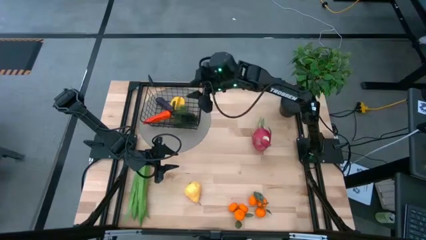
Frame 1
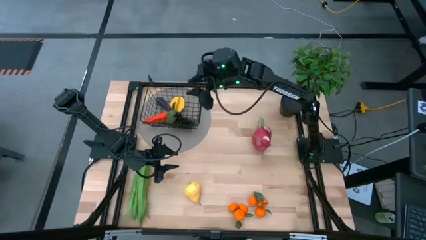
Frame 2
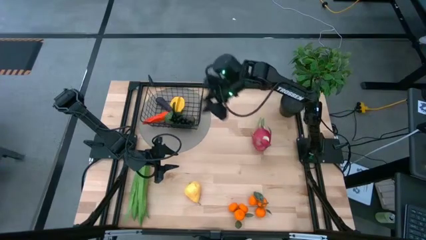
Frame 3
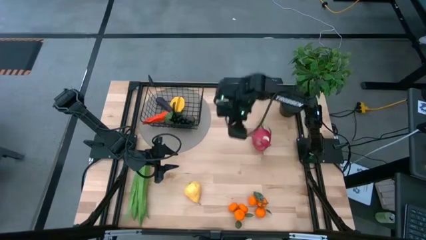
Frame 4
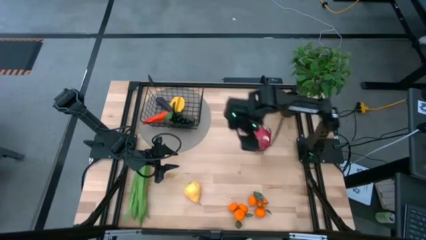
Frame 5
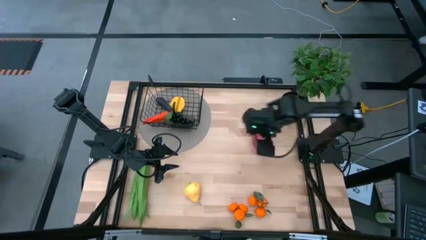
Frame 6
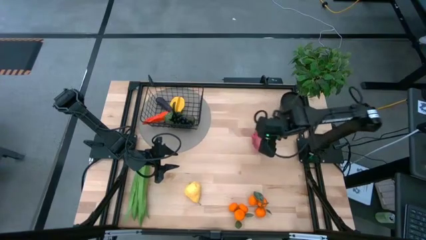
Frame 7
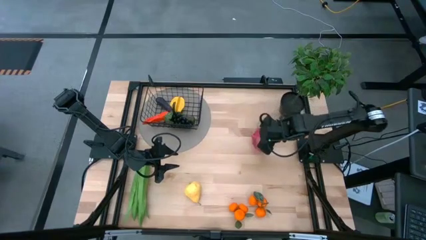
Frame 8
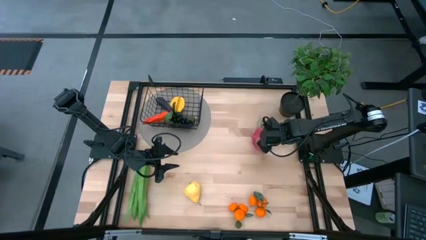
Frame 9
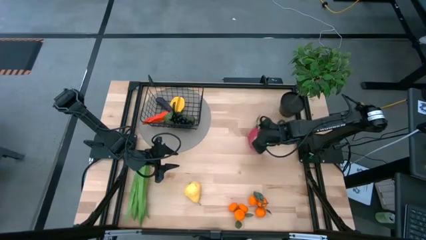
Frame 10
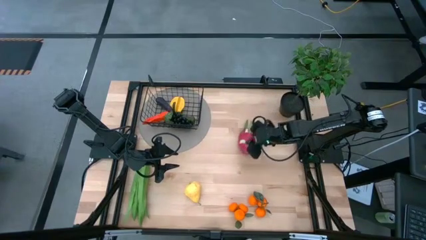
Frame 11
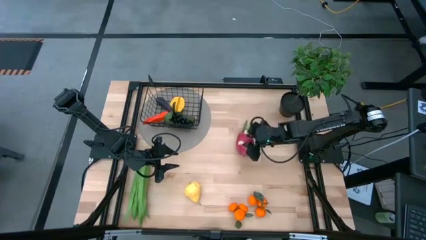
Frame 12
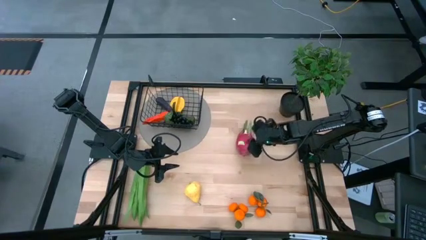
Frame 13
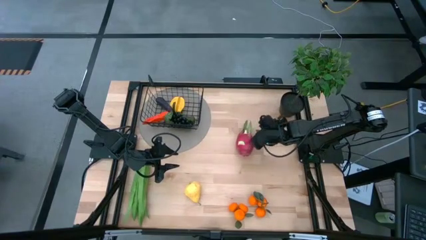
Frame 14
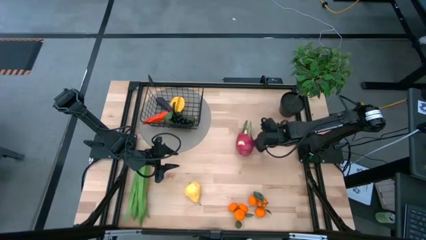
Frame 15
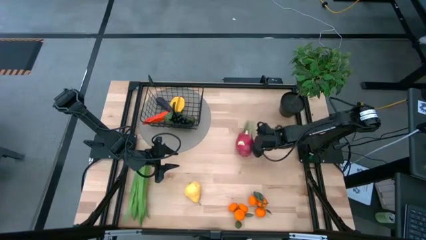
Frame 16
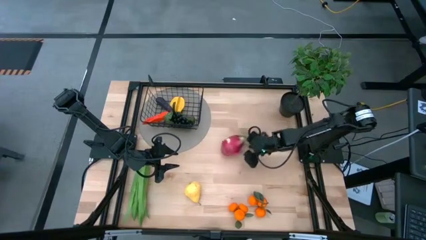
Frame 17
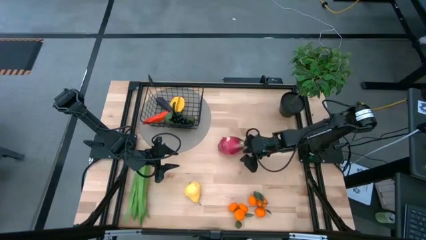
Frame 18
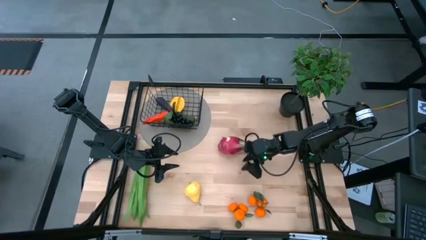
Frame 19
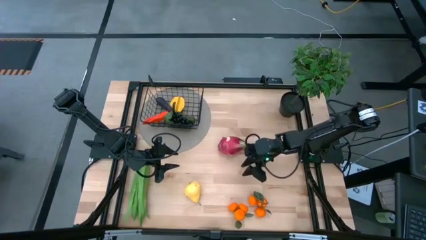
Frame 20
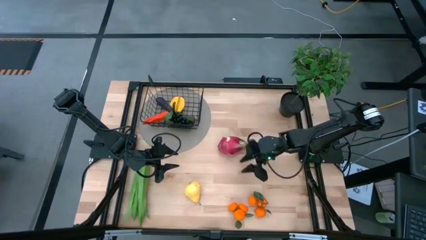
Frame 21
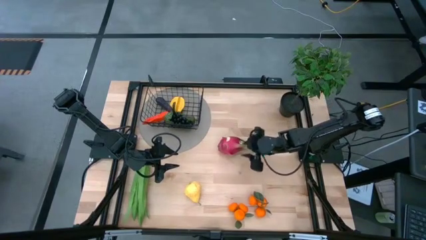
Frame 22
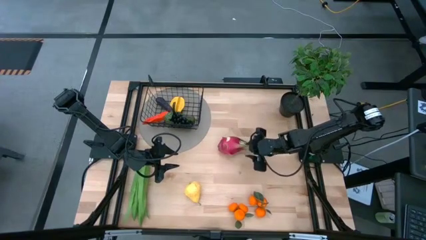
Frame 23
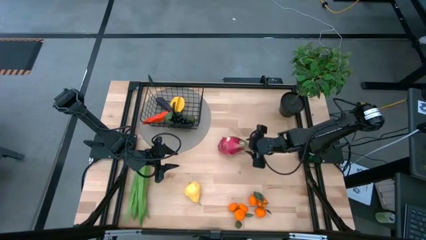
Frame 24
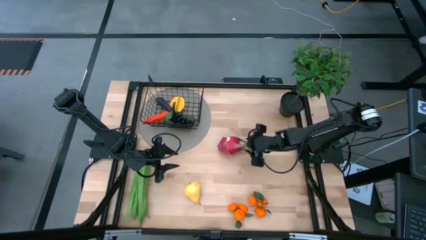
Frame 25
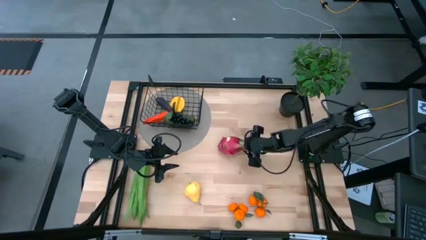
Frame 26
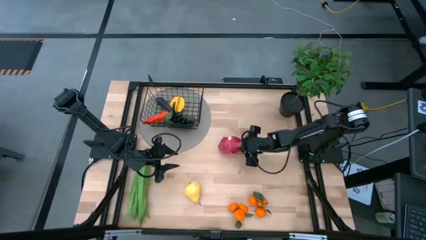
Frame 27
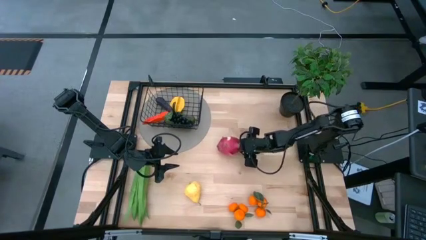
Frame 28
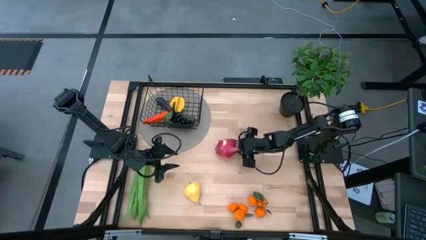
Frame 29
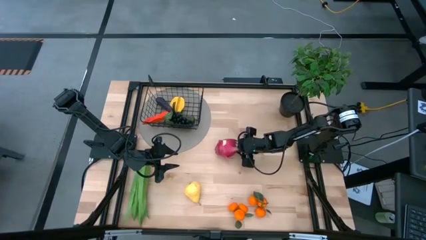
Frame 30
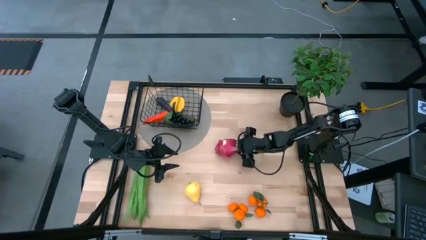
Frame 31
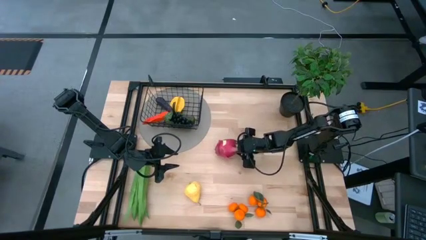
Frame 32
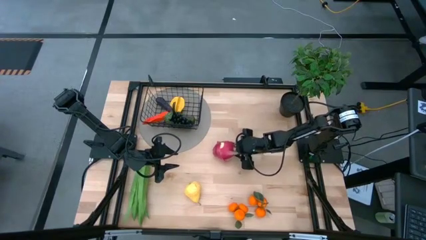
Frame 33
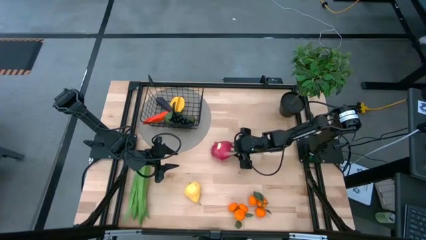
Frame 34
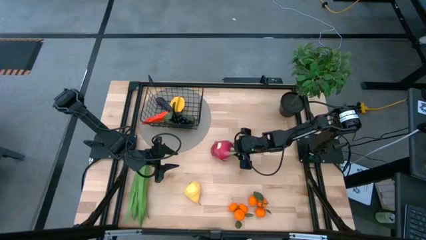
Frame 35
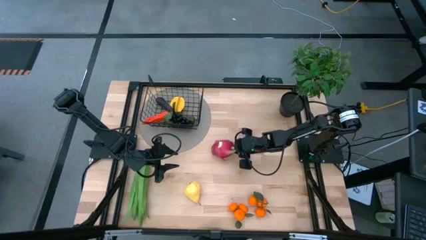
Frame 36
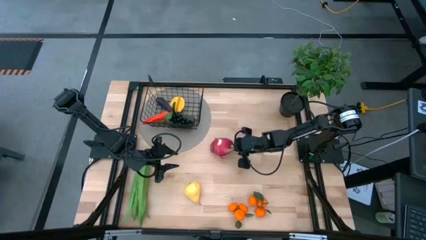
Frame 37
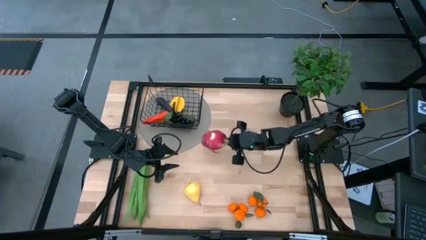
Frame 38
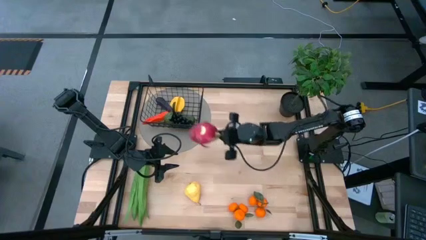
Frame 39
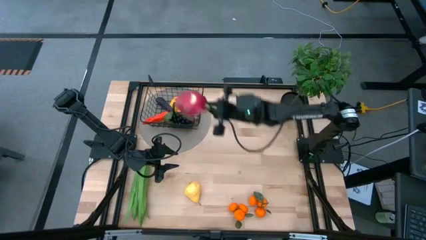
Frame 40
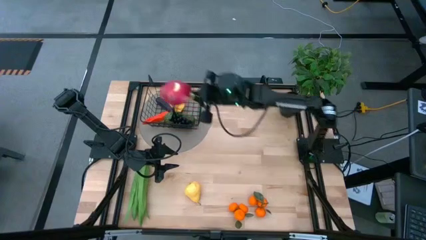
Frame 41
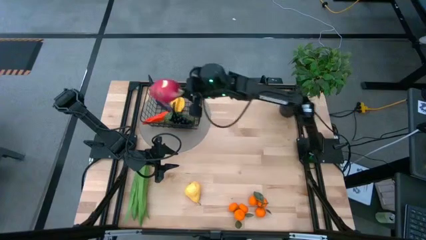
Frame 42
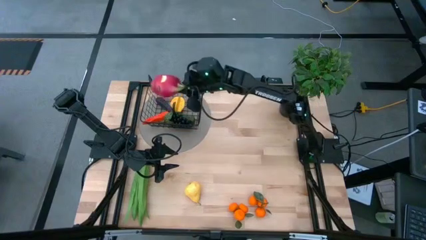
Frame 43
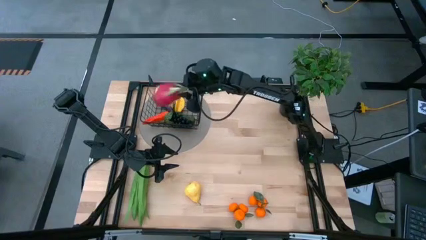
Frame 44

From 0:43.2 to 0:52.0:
Task: Build produce basket
Put the pink dragon fruit into the black wire basket

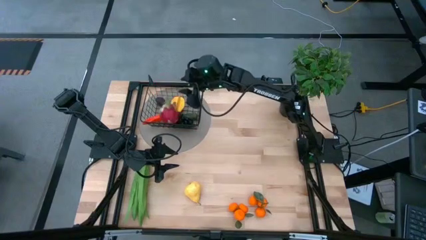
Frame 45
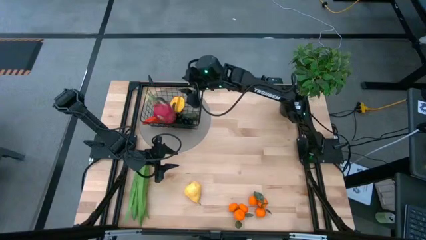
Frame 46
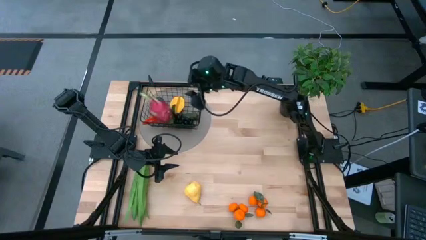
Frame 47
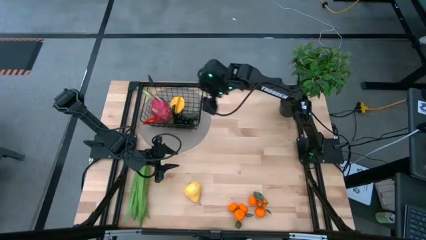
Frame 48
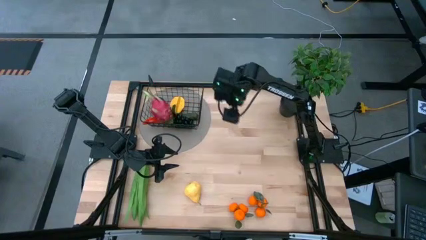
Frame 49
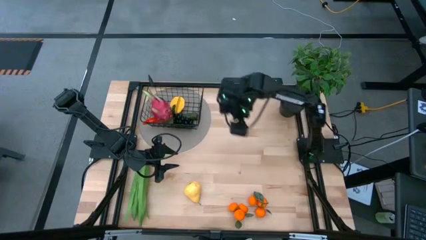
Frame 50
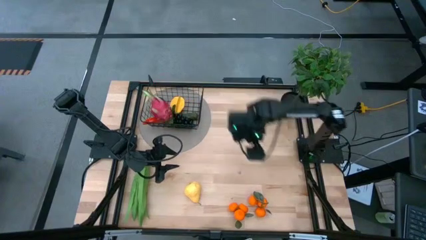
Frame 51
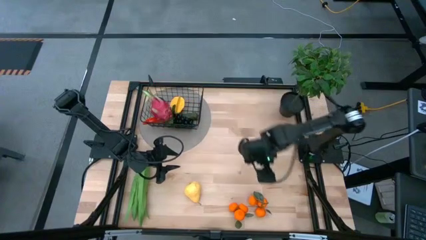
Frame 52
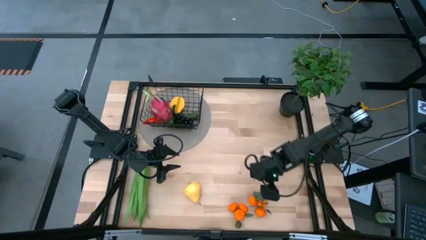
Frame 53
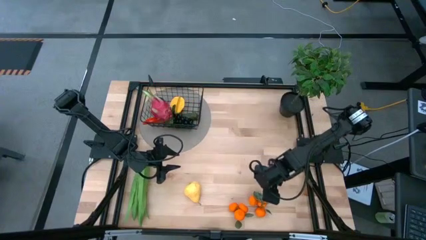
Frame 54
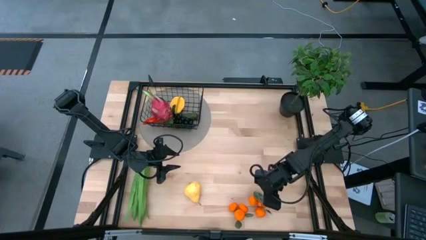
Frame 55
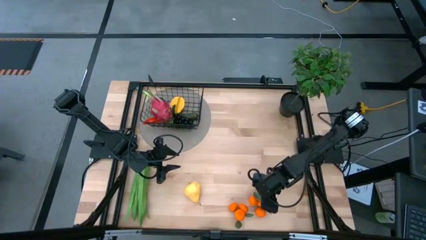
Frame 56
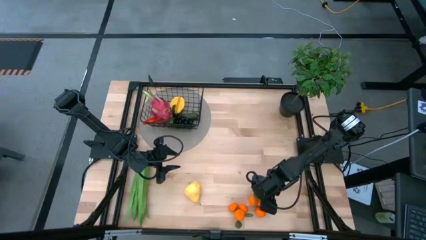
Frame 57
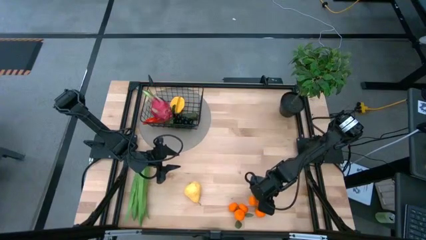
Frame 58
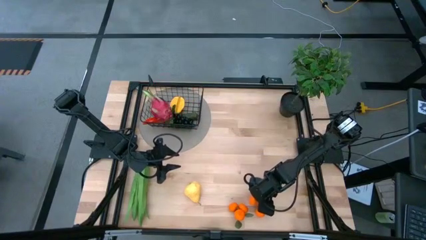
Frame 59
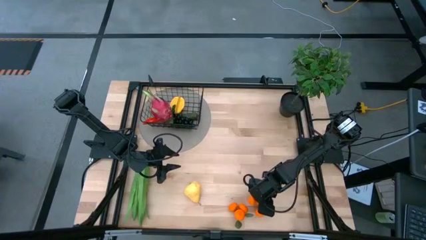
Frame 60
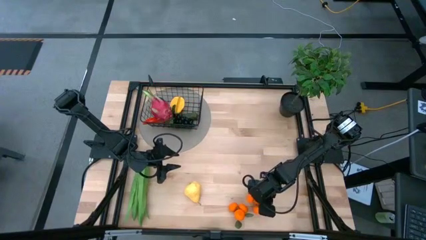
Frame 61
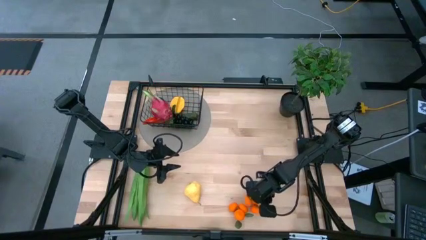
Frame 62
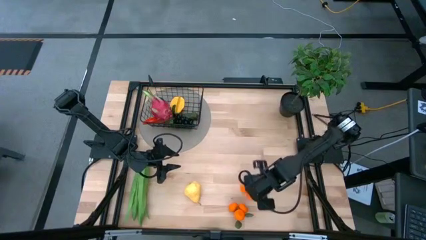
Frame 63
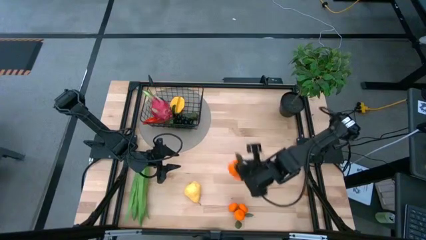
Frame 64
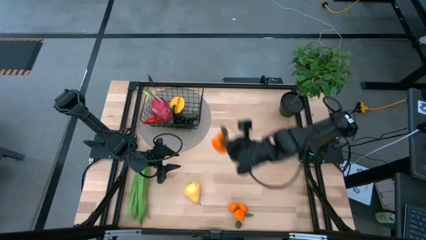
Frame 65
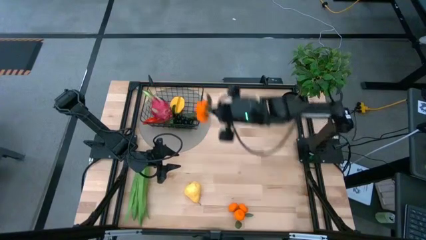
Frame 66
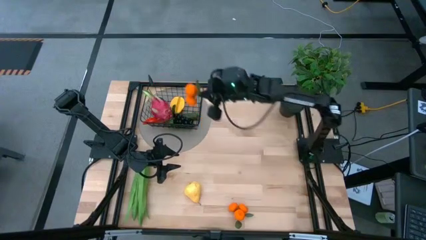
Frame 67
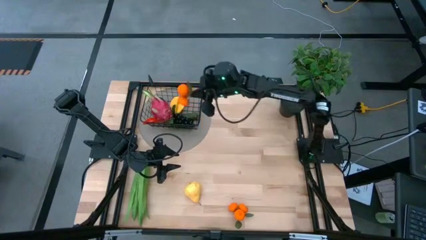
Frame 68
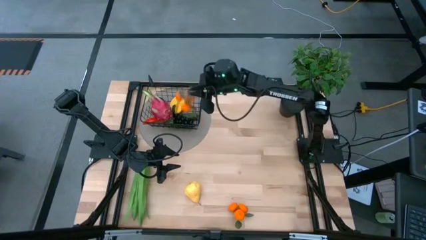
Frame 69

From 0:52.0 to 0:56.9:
Put the orange tangerine into the black wire basket

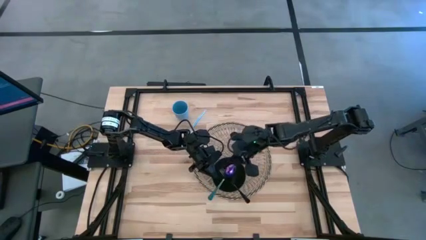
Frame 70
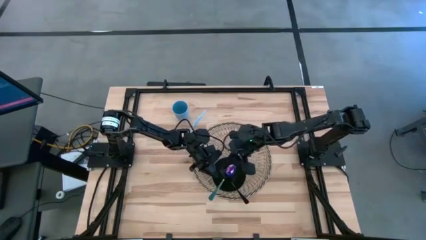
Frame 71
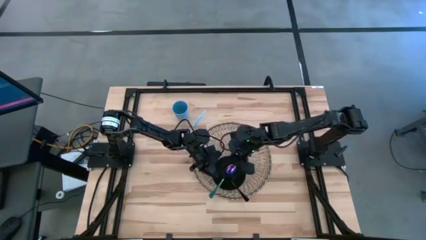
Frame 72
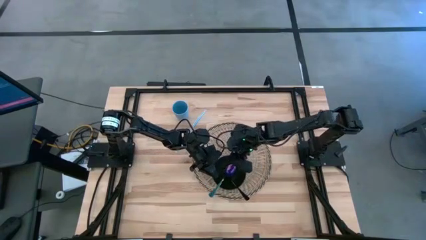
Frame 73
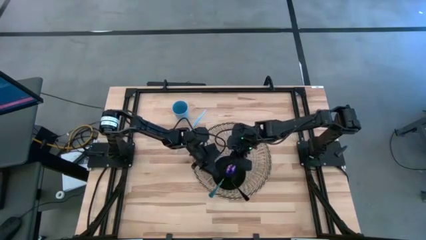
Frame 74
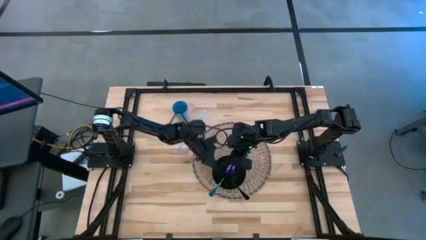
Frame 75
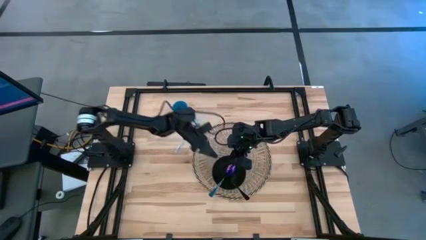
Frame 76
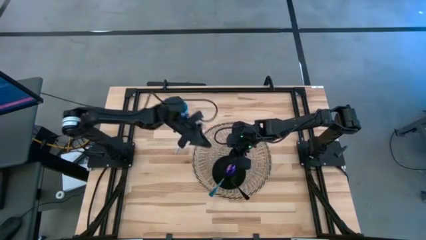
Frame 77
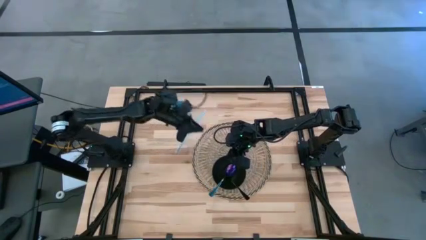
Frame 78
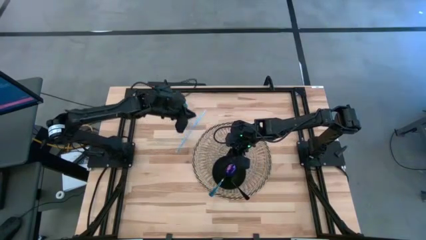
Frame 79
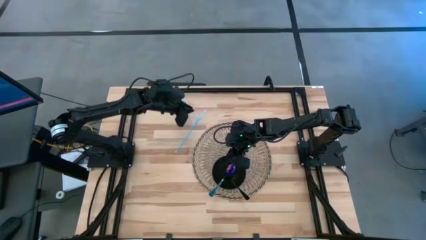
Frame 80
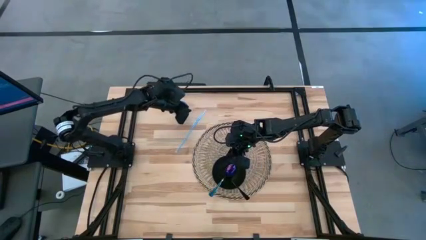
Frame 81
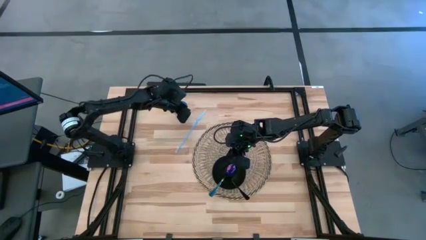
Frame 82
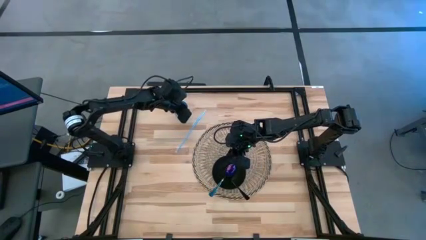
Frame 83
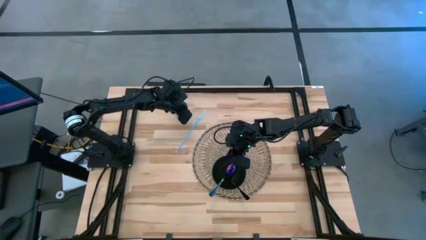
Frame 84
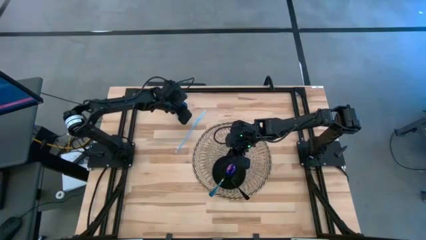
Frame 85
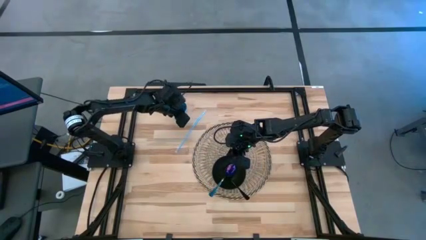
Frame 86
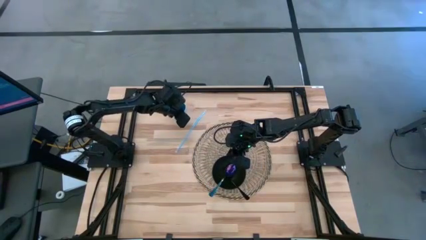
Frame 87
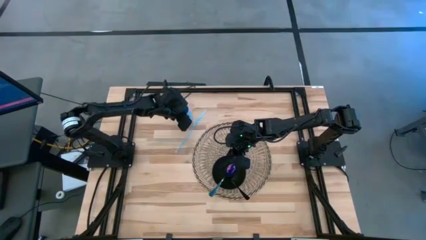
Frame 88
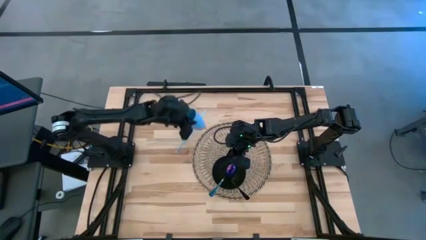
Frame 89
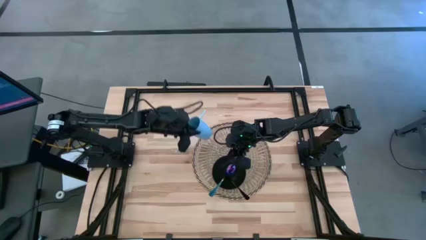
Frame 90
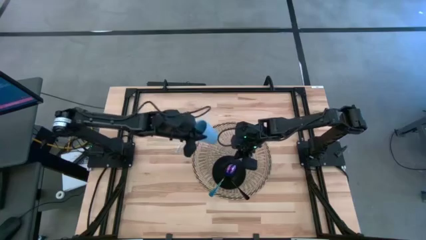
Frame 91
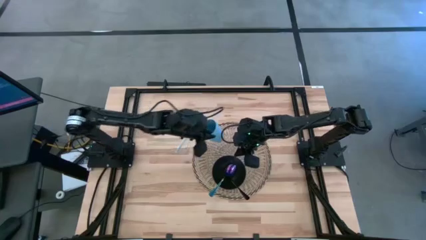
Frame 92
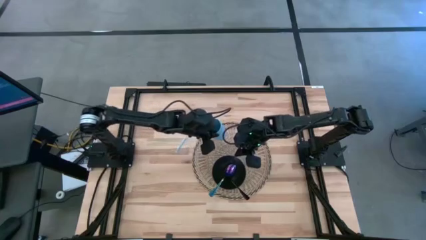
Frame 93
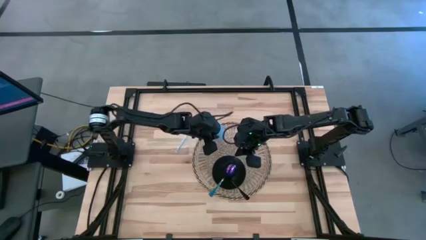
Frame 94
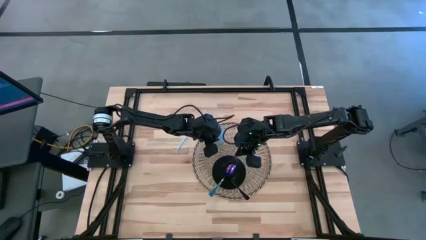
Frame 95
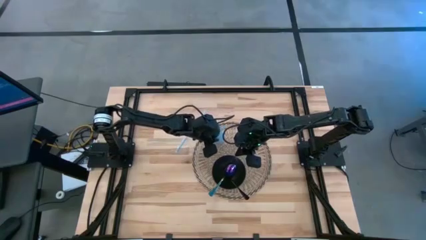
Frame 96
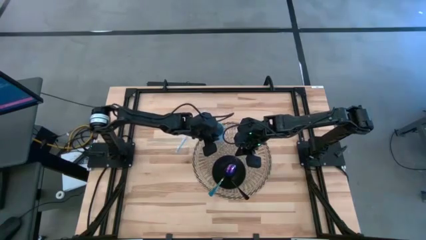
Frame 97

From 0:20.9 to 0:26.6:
Task: Pick & Place Utensil
Put the blue cup on the brown mat to the top left of the green plate
